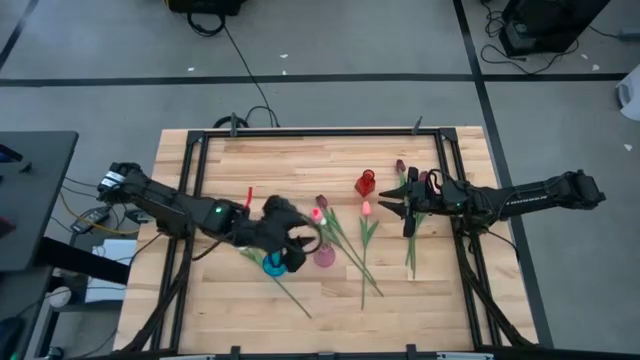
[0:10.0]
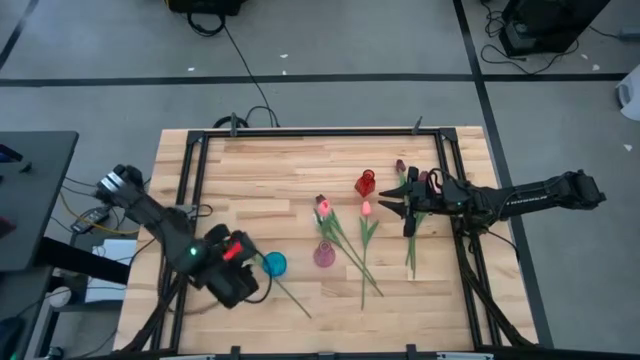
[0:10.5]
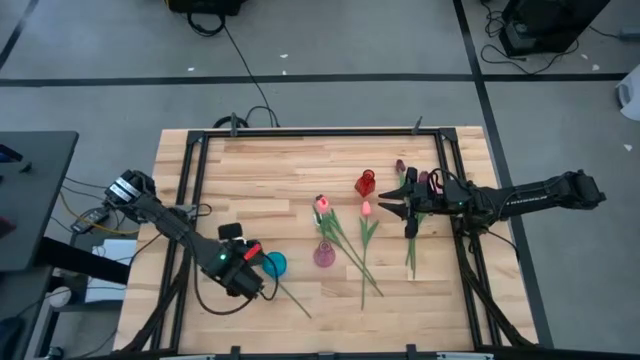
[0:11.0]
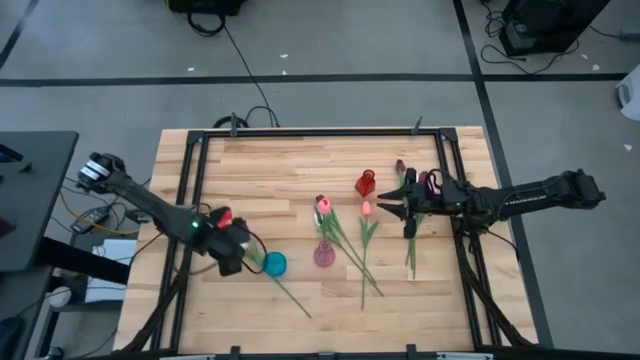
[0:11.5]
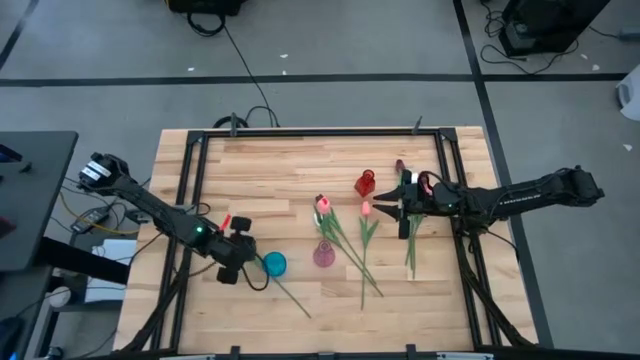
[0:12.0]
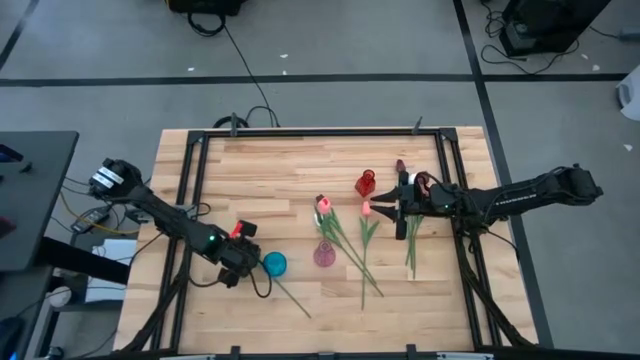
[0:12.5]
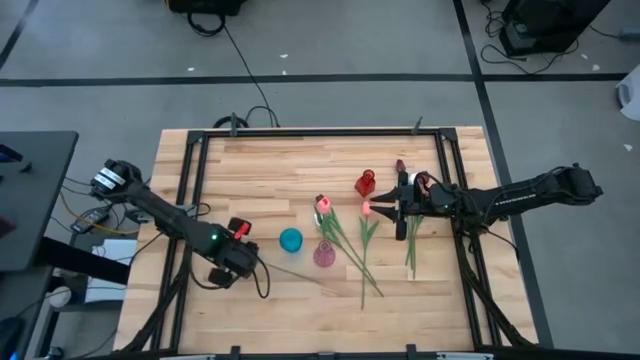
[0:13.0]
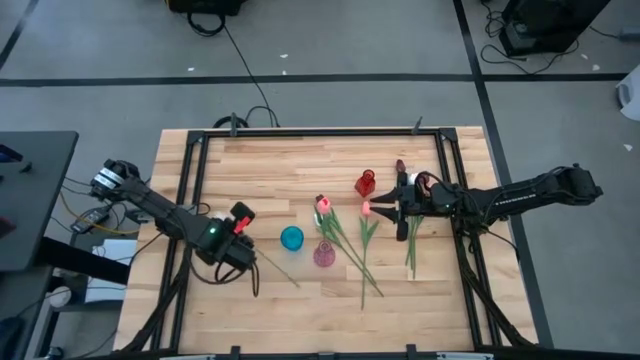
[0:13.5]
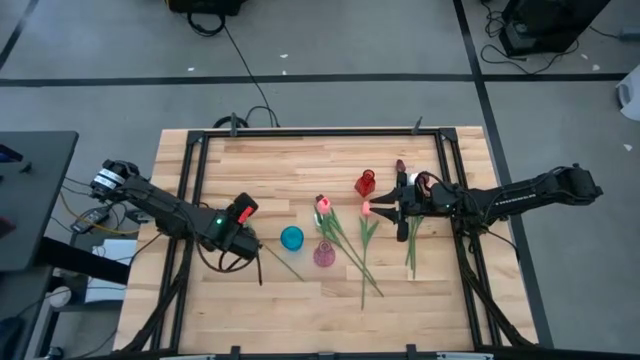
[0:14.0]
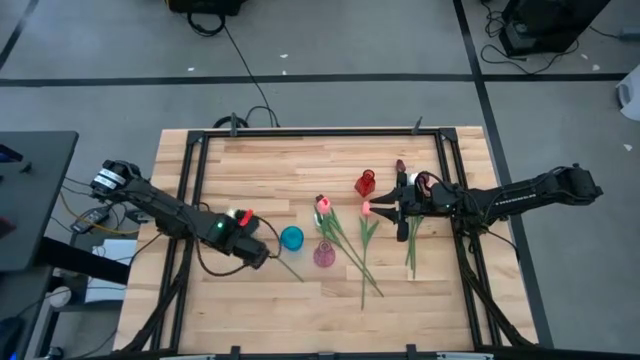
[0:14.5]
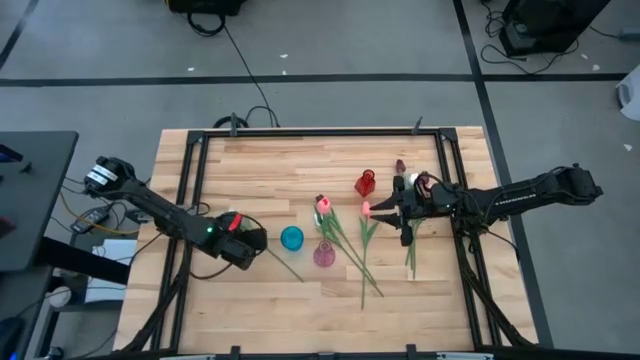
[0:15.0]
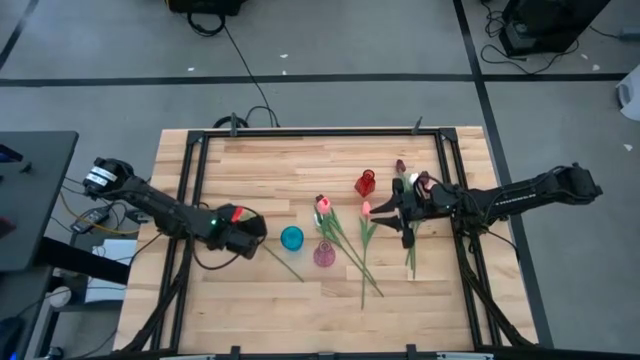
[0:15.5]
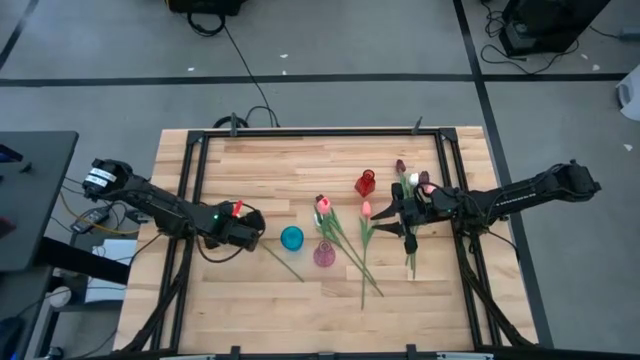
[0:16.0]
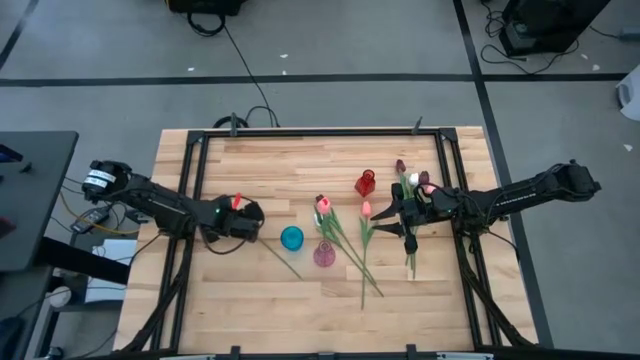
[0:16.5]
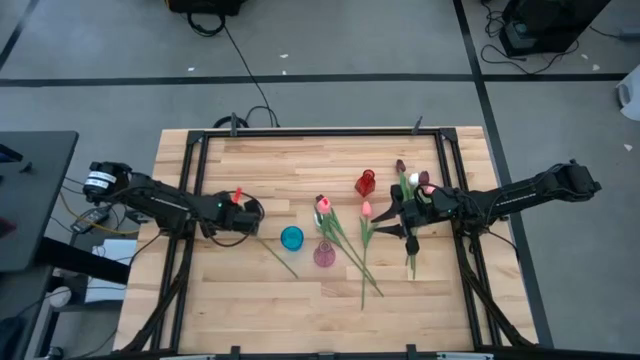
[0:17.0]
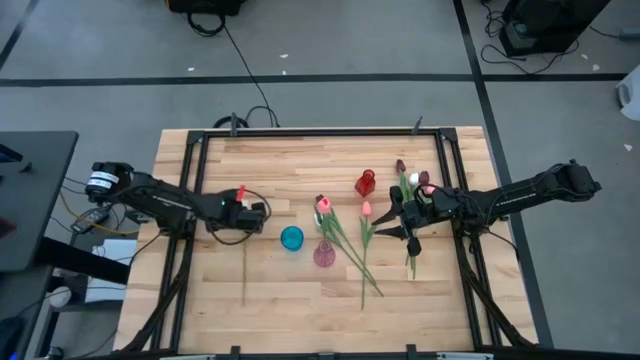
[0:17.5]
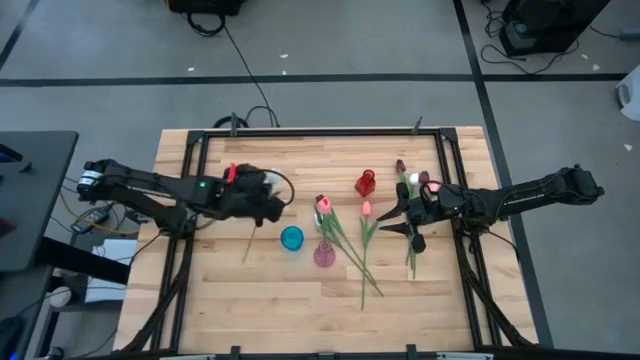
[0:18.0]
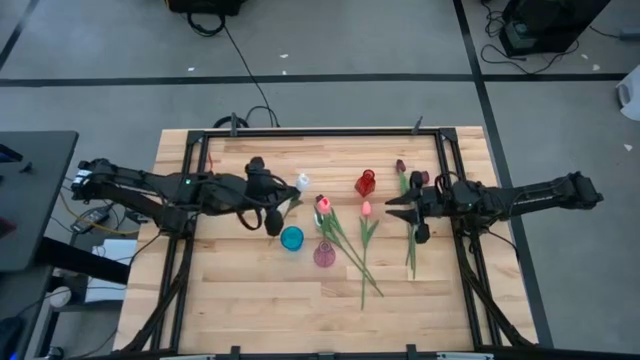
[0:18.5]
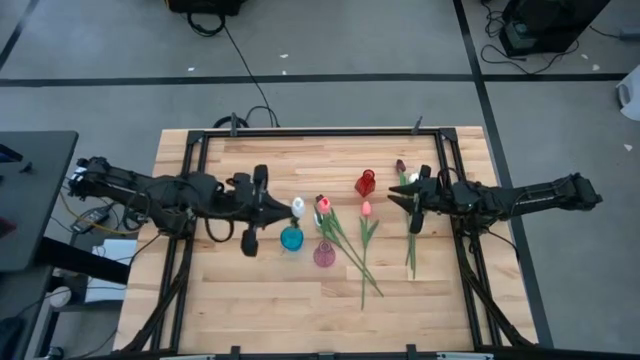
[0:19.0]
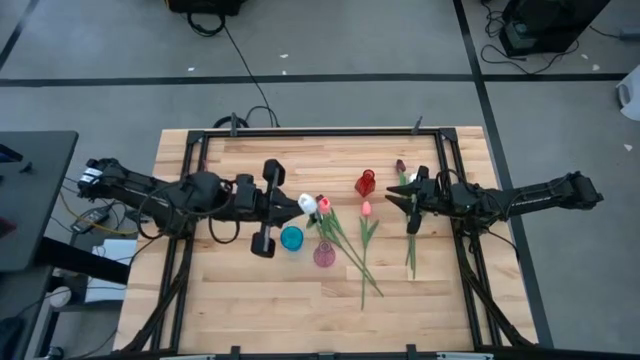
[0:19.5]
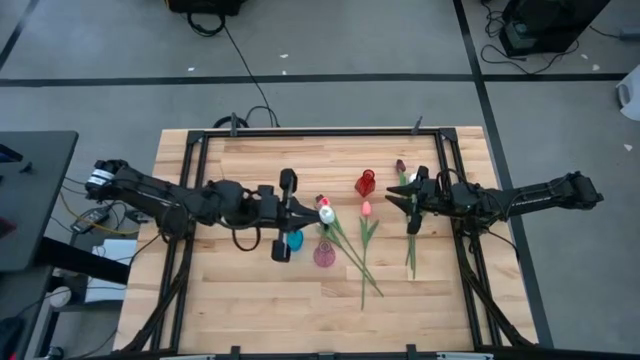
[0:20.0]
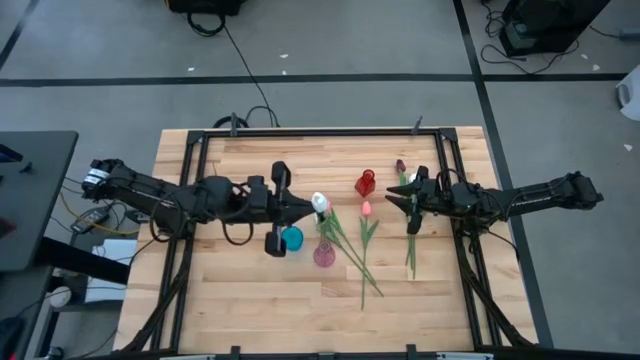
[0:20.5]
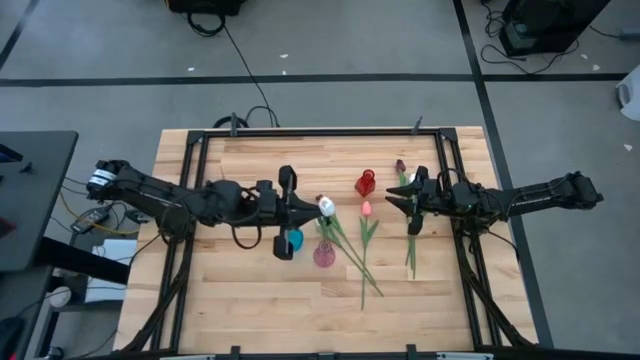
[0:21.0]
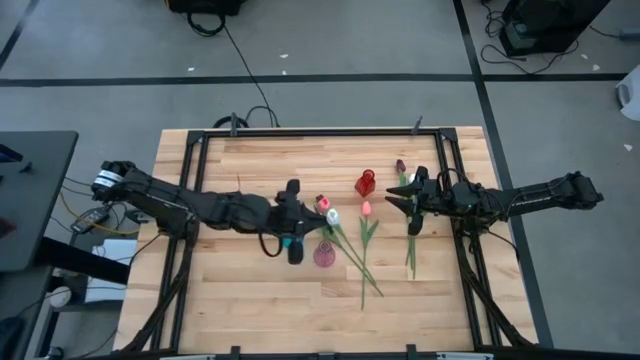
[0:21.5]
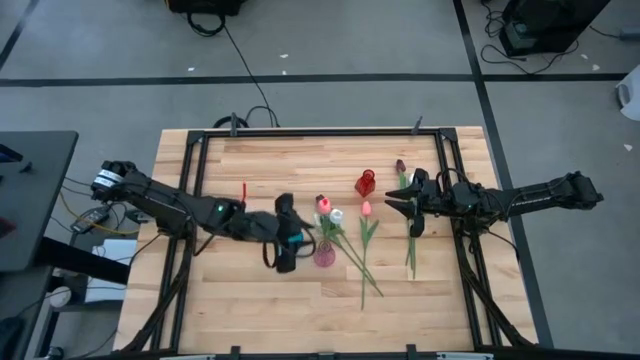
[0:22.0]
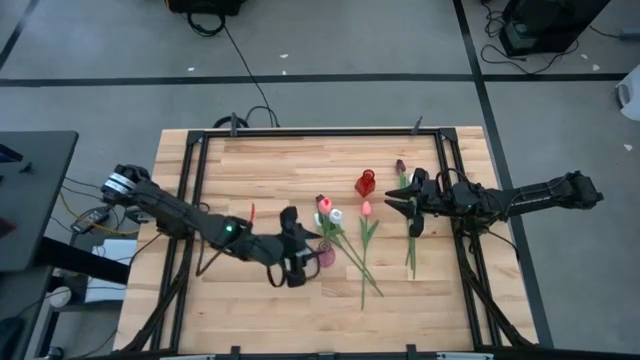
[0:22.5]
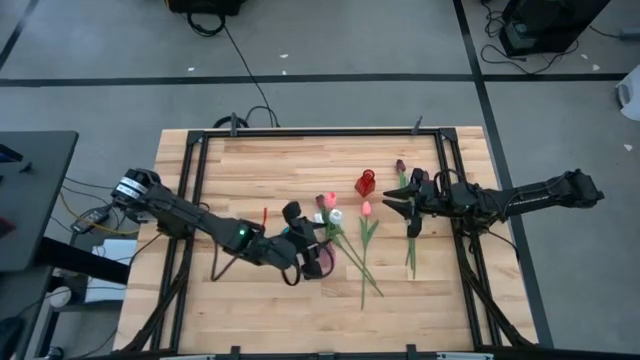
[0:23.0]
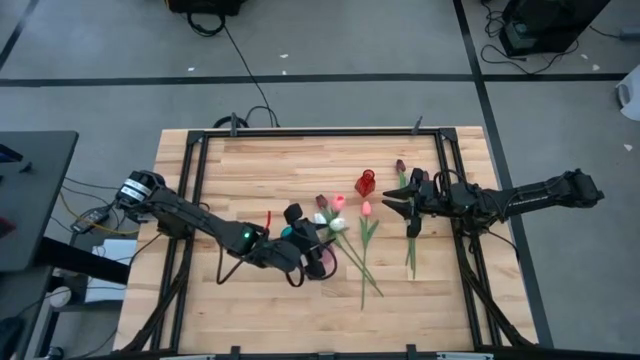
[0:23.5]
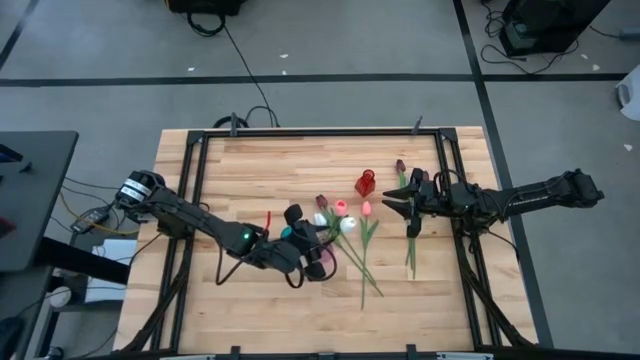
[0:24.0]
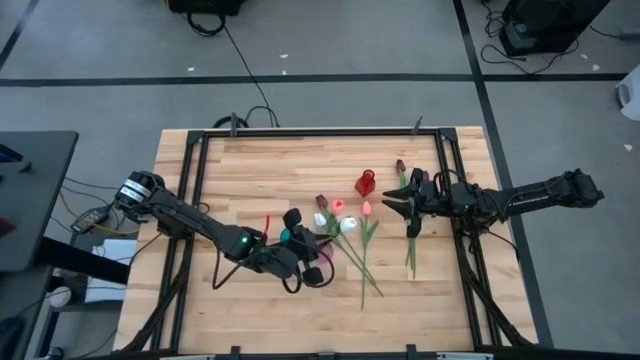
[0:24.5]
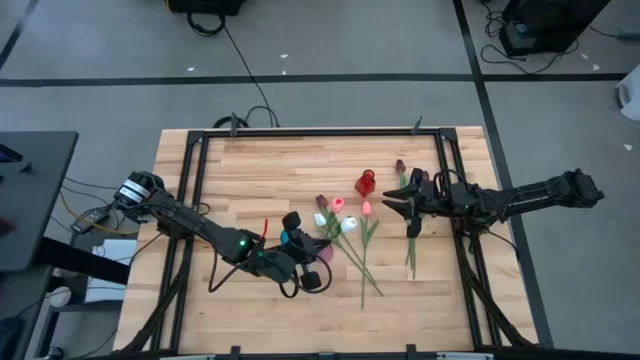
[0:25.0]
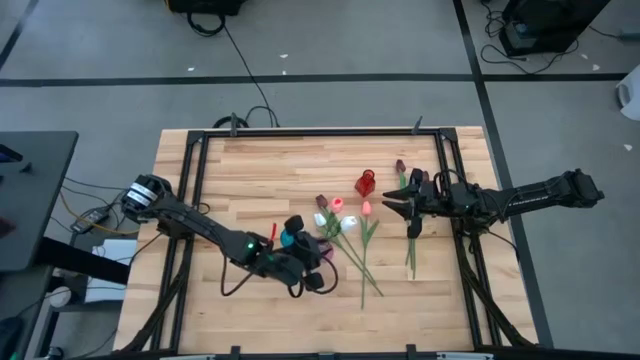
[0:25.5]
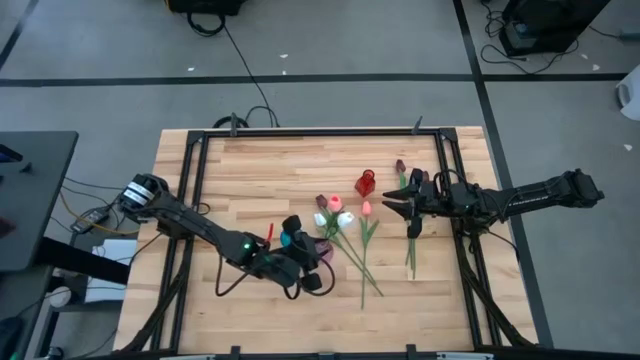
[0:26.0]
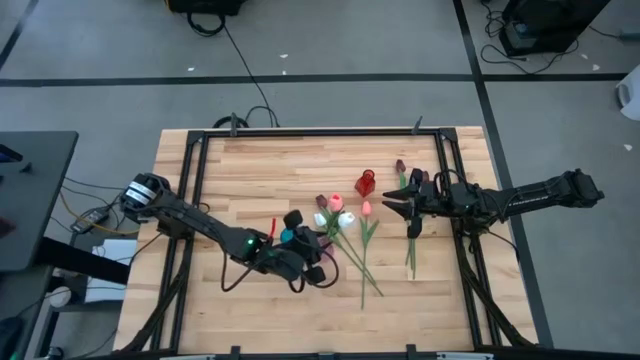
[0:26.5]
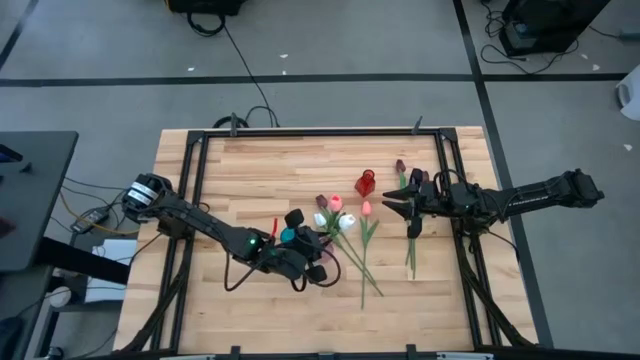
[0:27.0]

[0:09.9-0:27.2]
Task: Sort flowers into vase by color
Put the bottom left white tulip into the blue vase

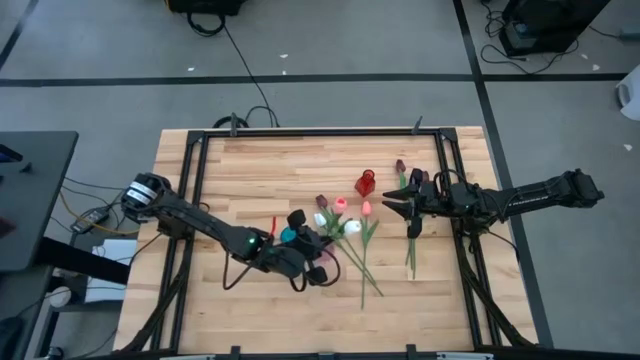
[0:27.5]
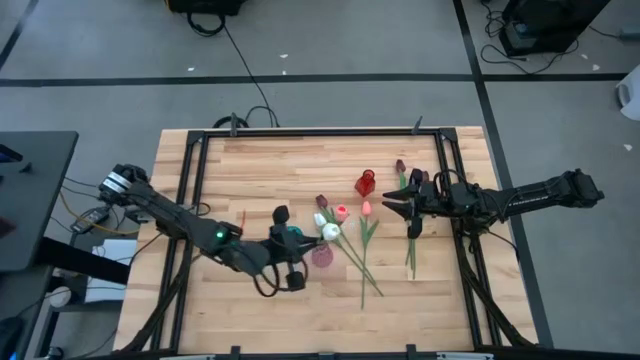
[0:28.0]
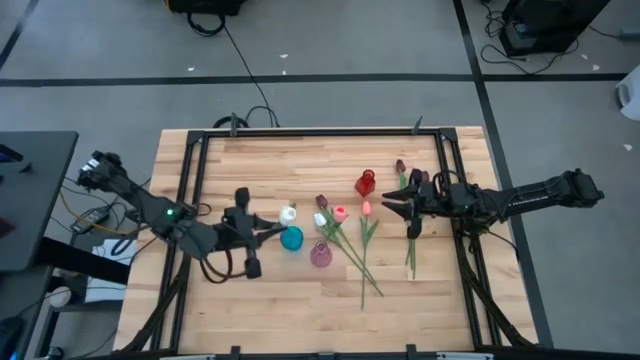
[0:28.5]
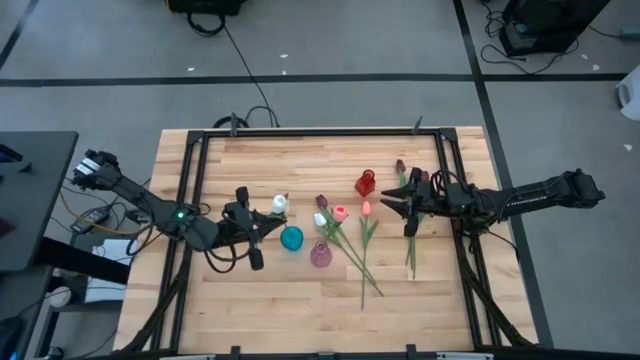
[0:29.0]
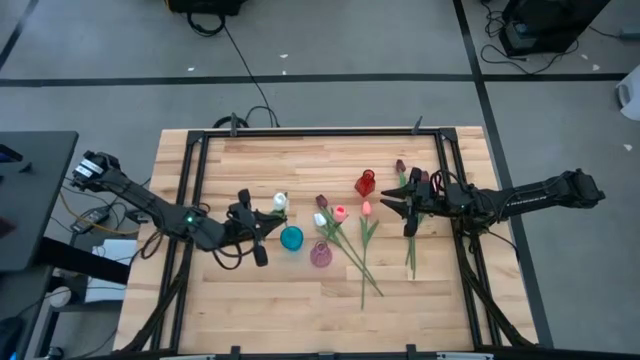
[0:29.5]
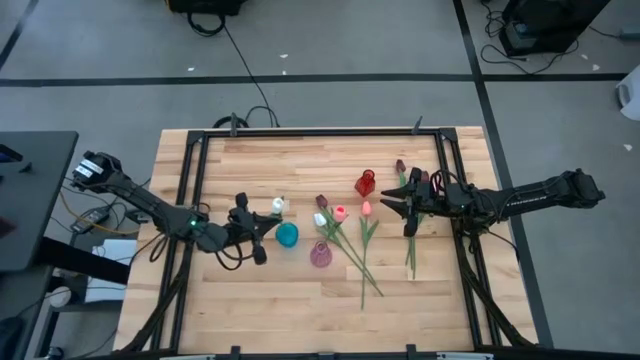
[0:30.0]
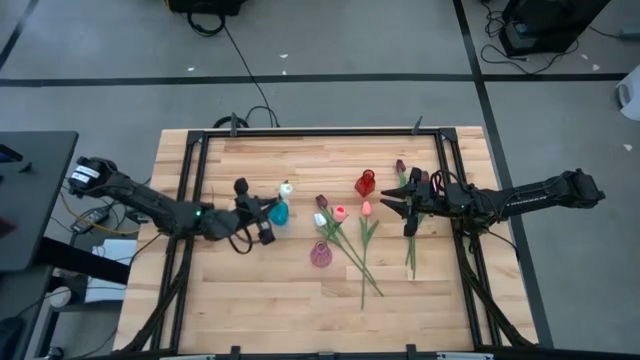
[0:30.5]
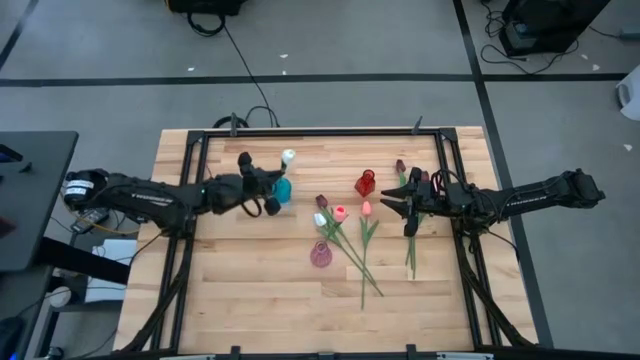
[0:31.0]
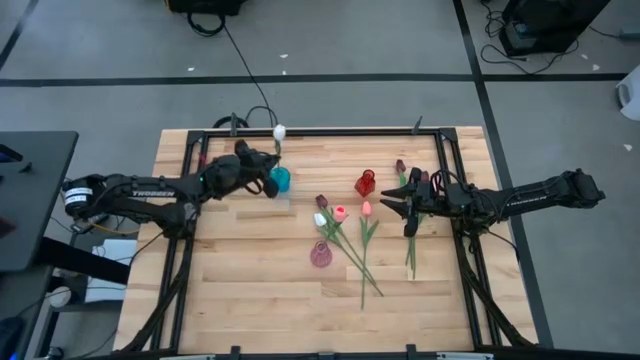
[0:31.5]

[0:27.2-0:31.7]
Put the left white tulip into the blue vase
